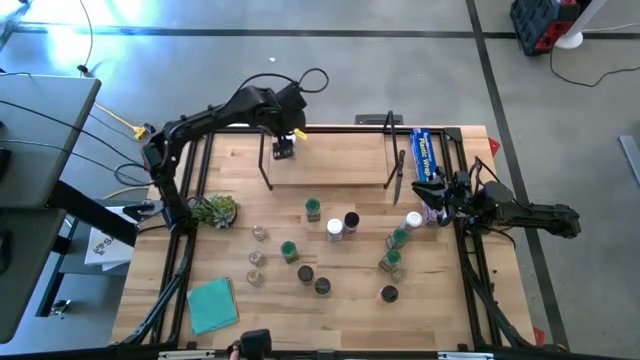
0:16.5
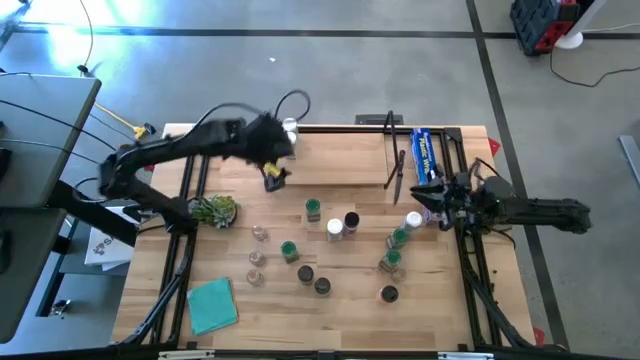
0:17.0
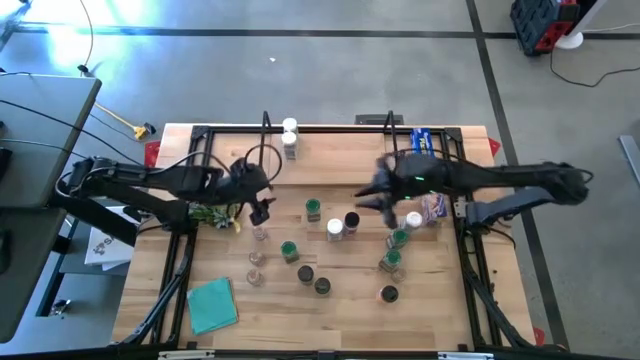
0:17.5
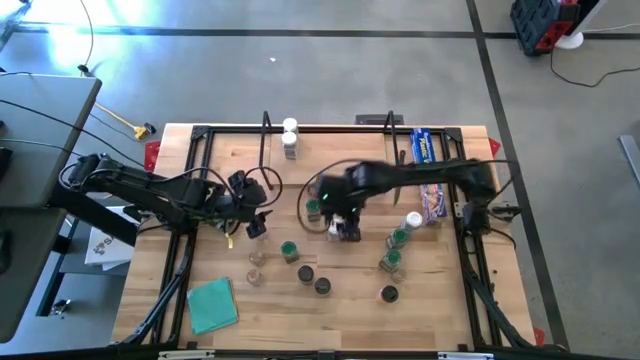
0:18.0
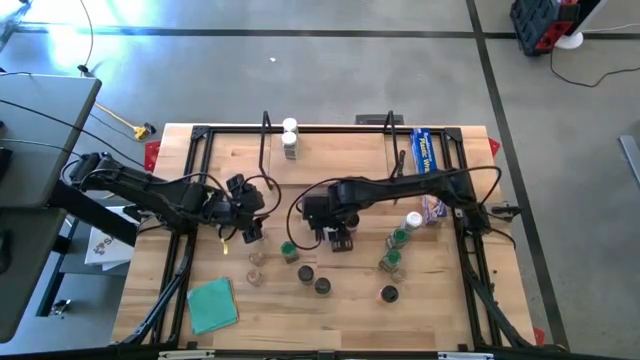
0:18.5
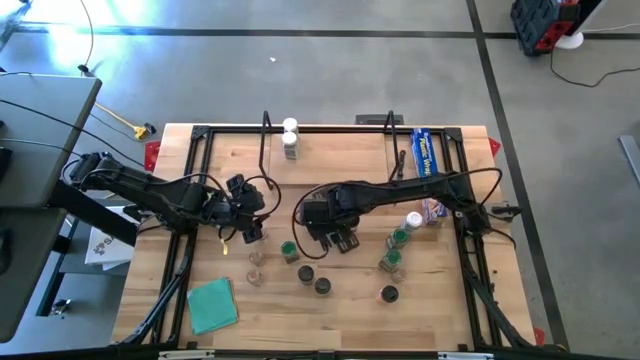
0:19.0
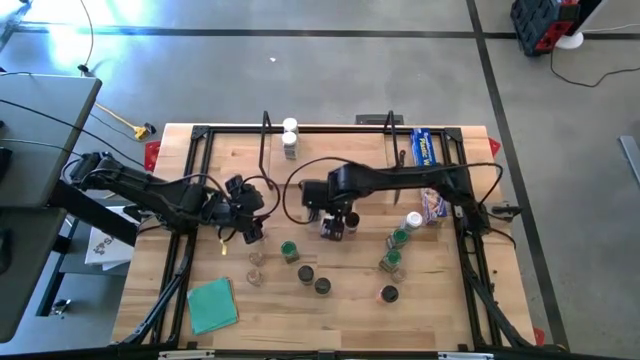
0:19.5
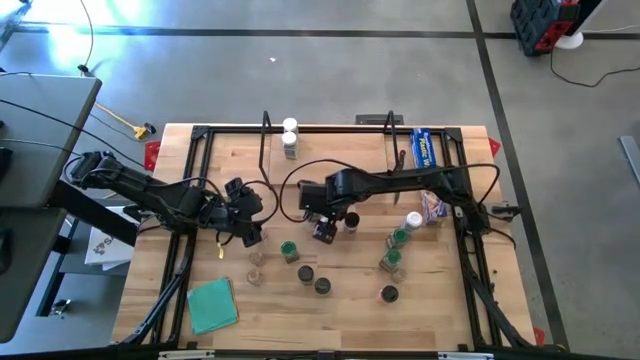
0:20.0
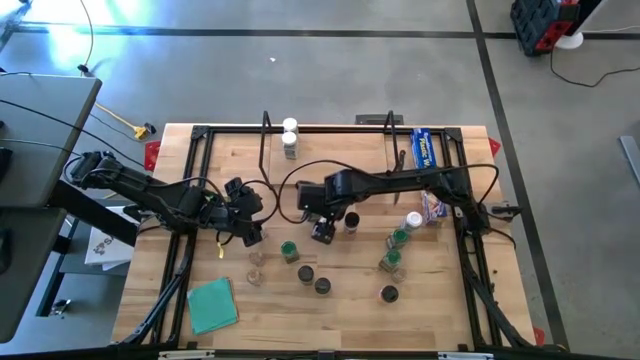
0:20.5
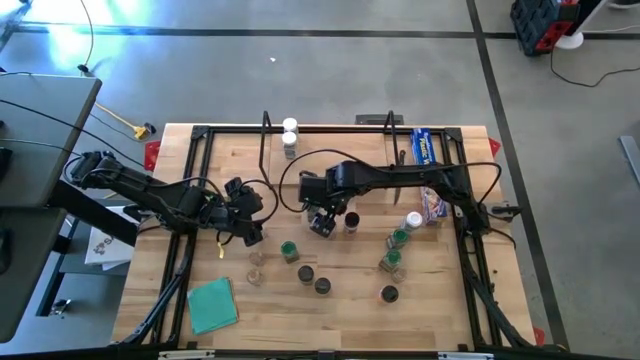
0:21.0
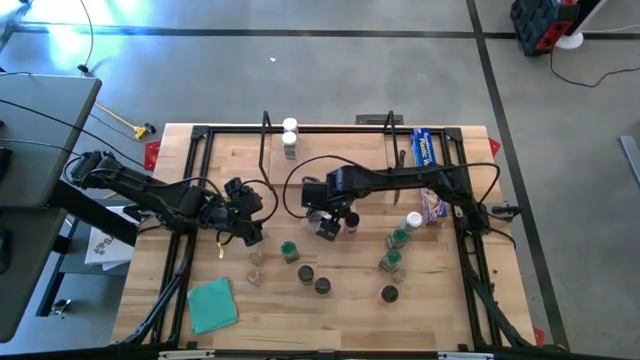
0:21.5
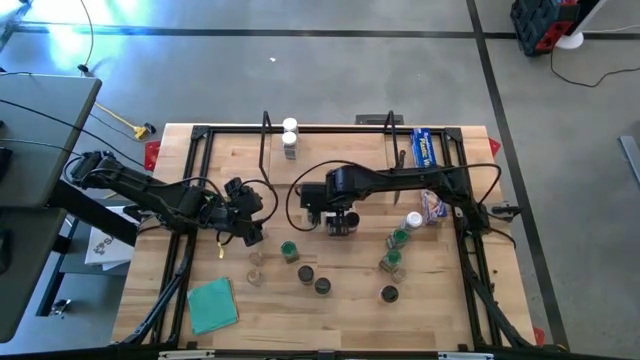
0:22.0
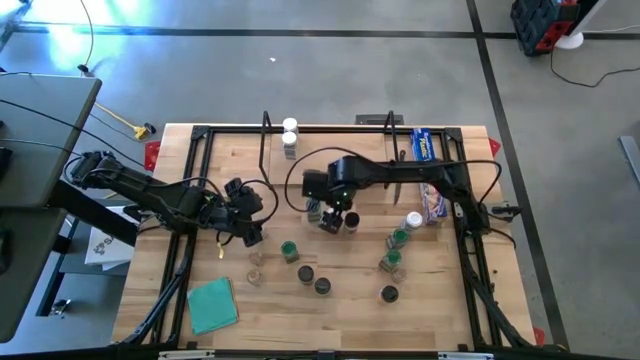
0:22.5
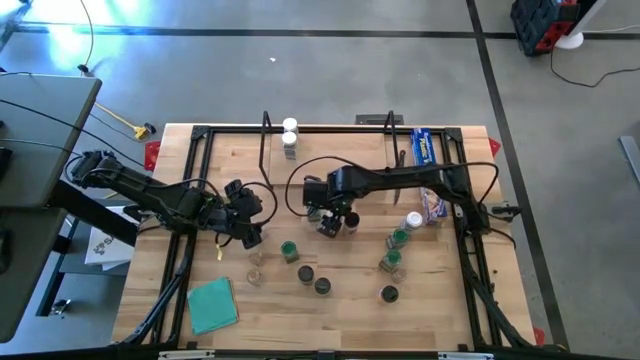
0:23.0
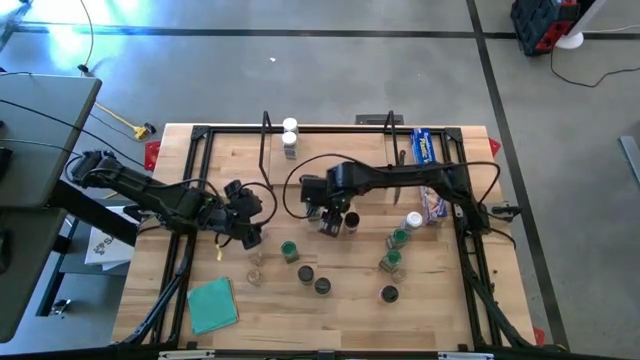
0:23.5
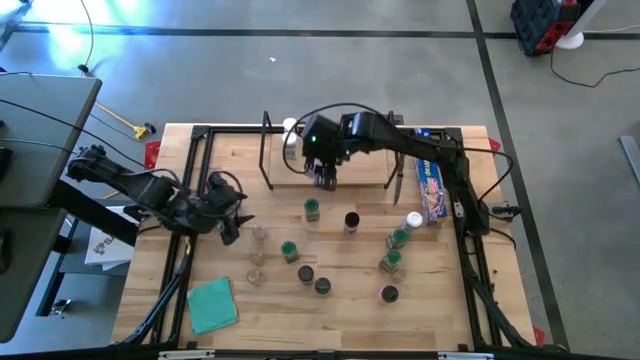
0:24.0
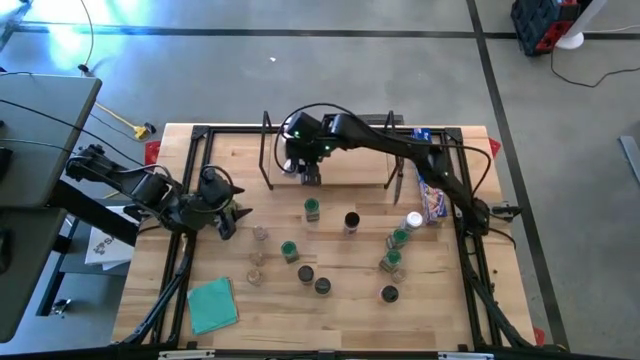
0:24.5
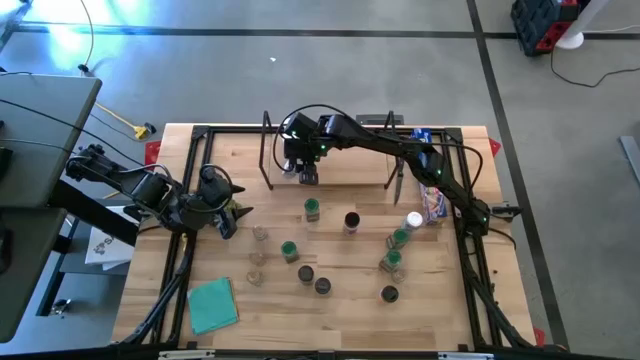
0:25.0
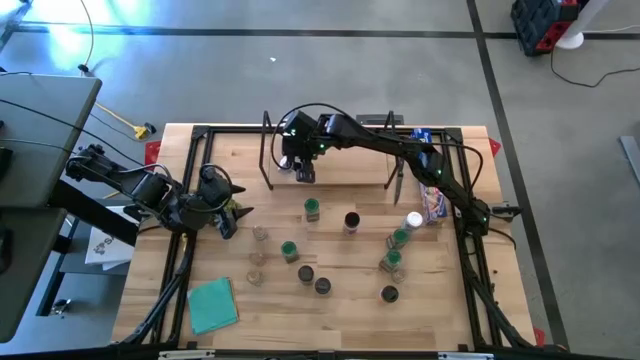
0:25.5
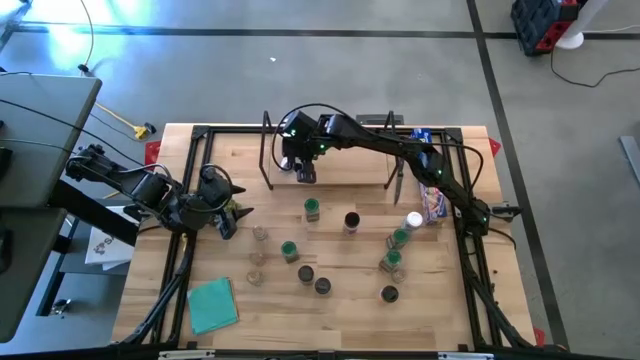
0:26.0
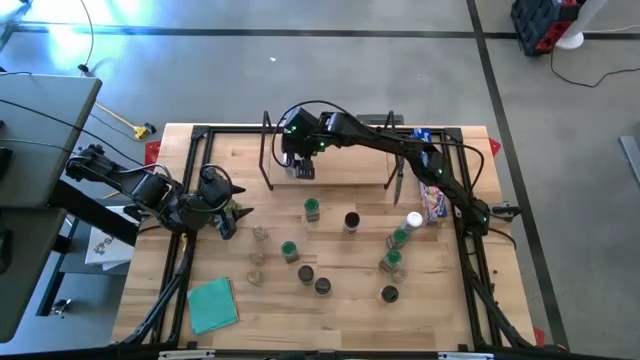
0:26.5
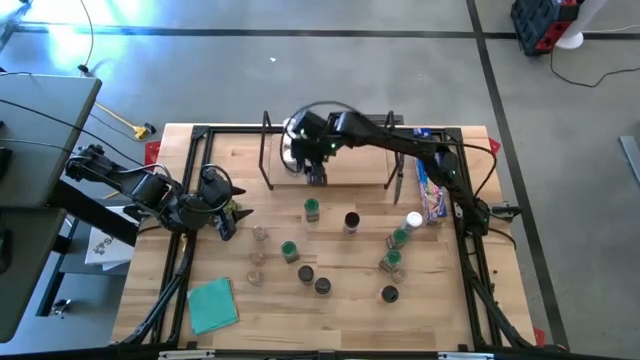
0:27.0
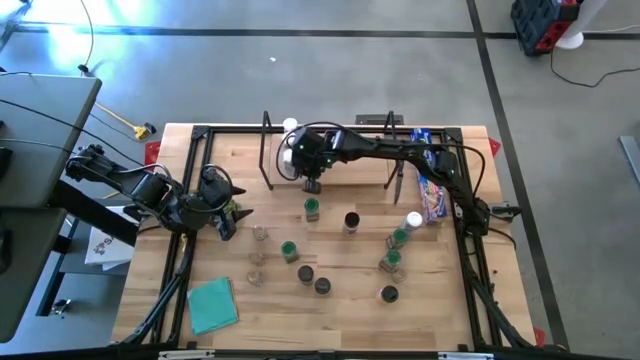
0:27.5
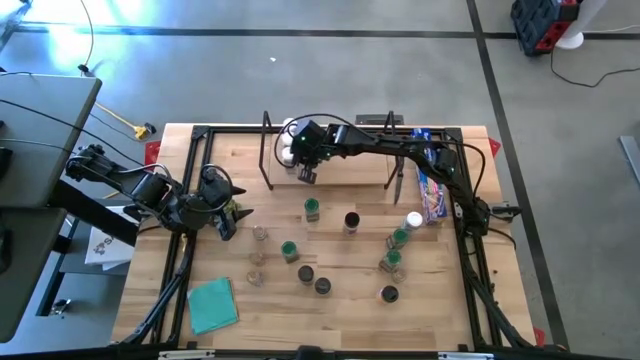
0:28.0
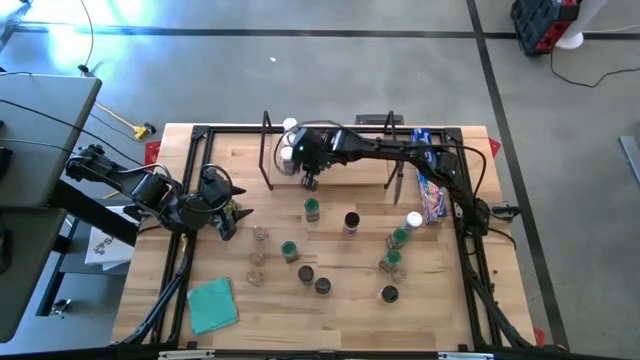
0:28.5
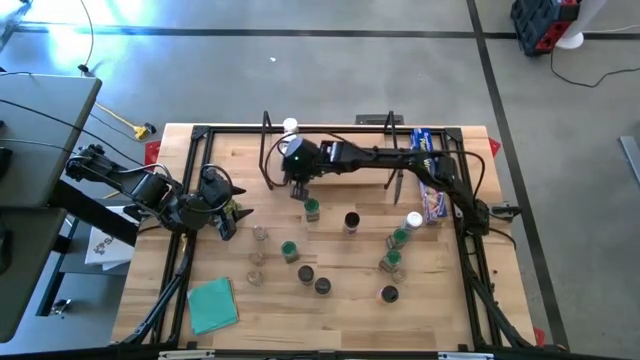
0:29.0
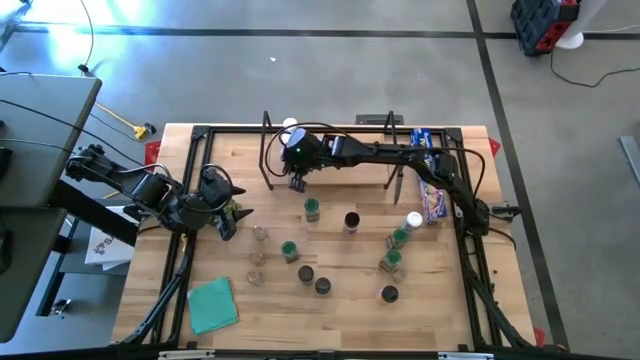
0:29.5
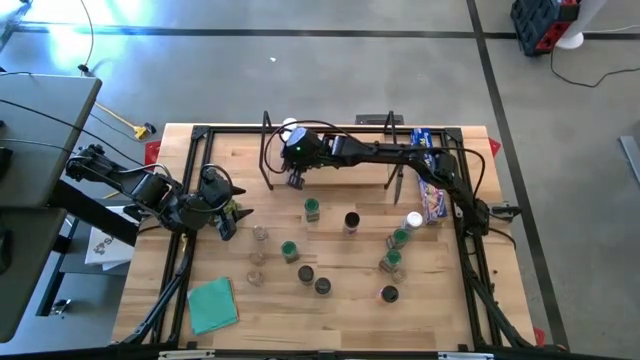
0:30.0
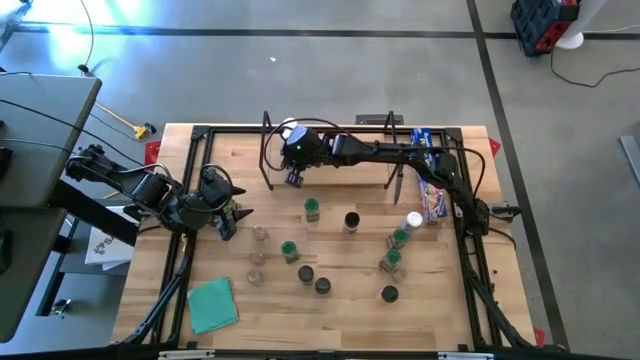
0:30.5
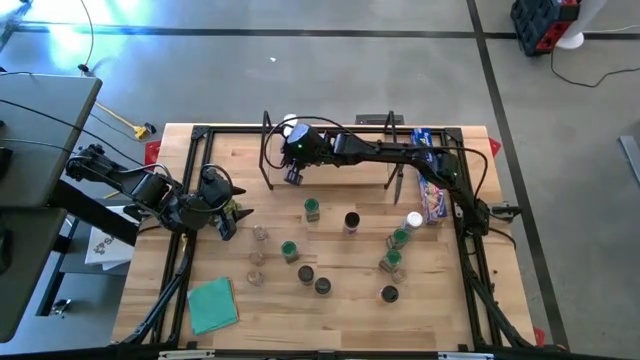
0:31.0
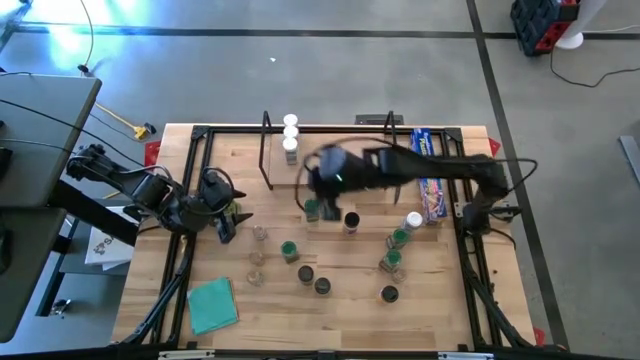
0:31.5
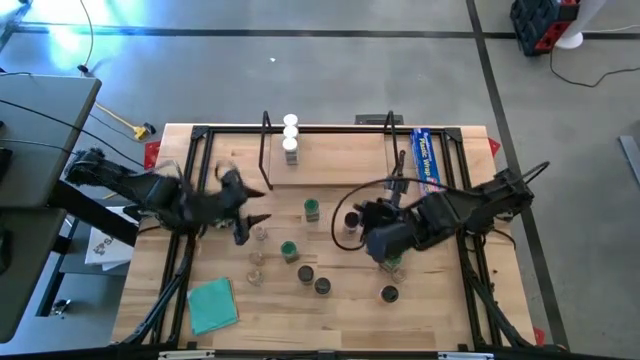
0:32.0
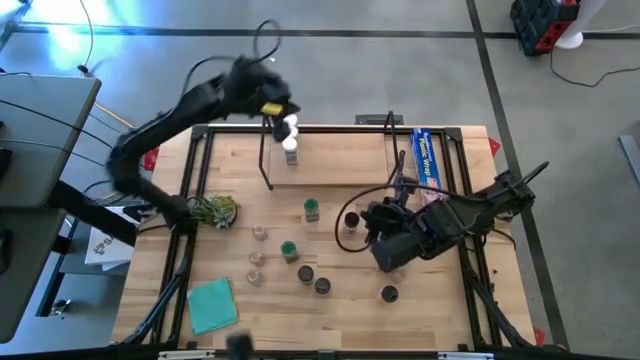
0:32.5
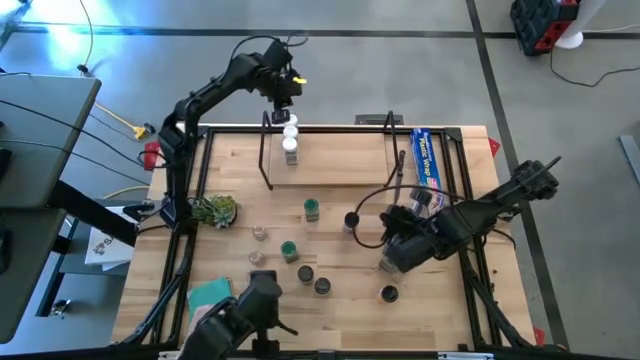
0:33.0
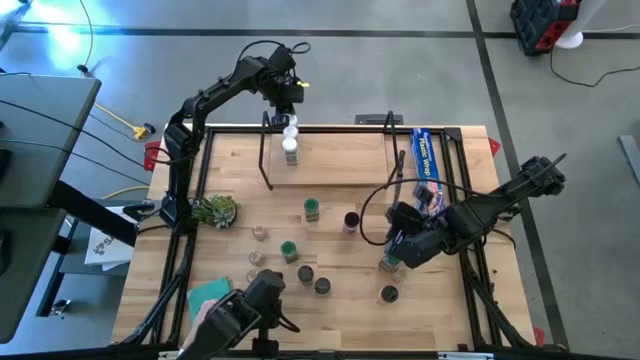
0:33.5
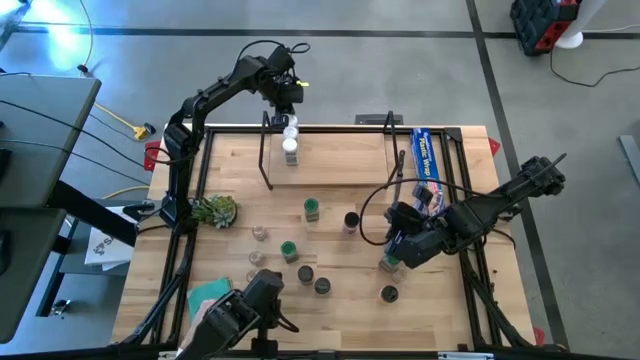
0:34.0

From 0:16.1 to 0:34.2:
Task: Shelf spices
Put the white seasoning bottle on the shelf aligned with the other white seasoning bottles
